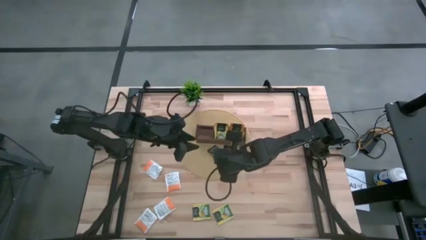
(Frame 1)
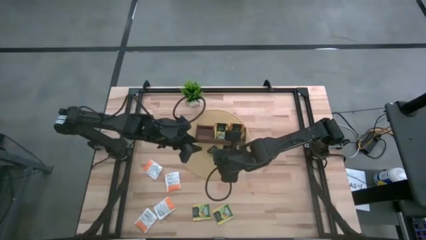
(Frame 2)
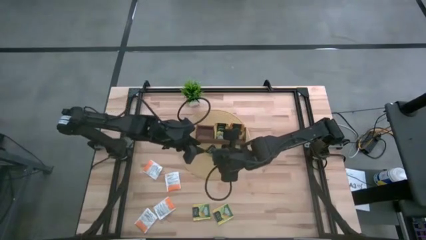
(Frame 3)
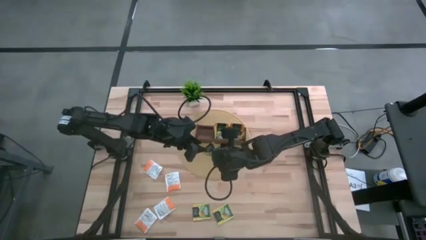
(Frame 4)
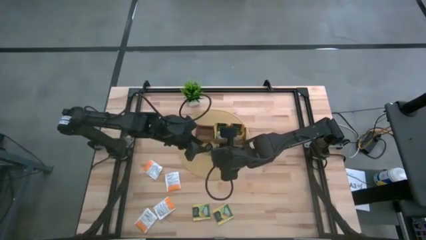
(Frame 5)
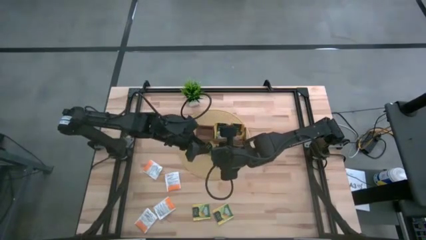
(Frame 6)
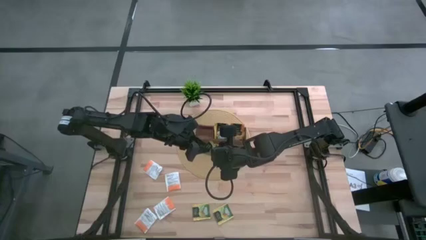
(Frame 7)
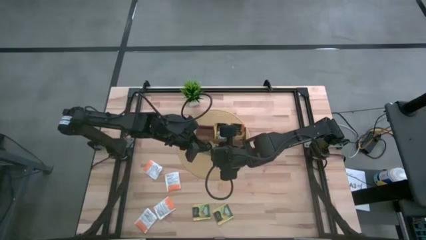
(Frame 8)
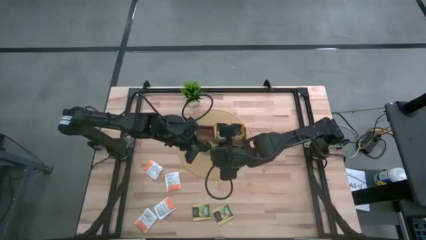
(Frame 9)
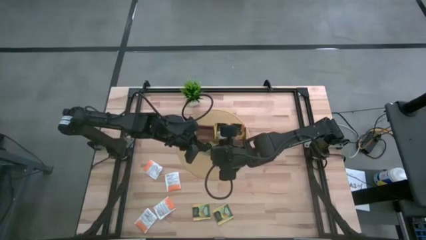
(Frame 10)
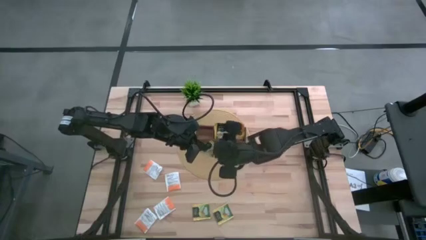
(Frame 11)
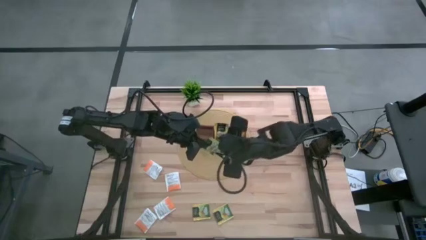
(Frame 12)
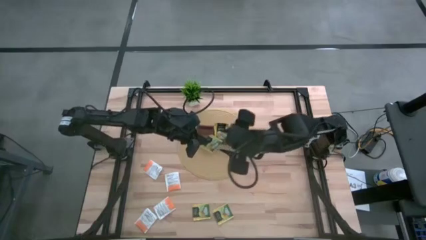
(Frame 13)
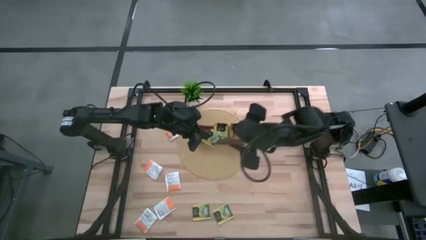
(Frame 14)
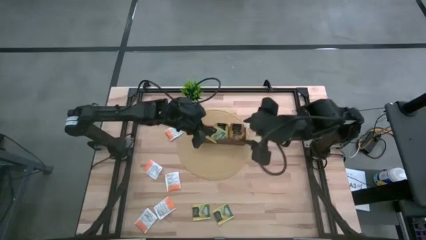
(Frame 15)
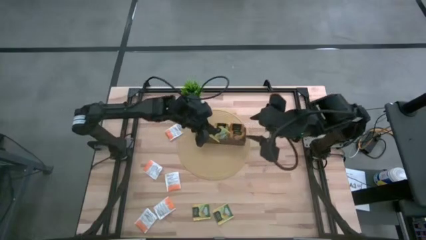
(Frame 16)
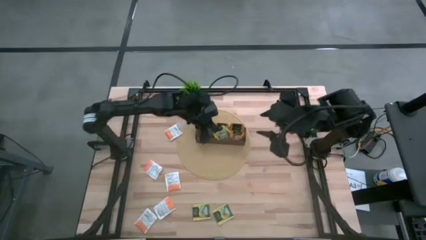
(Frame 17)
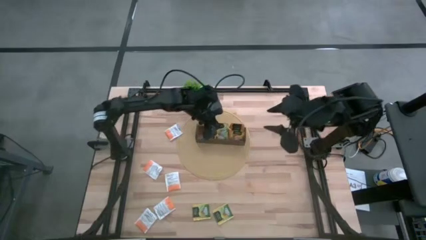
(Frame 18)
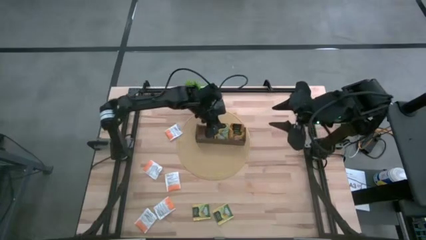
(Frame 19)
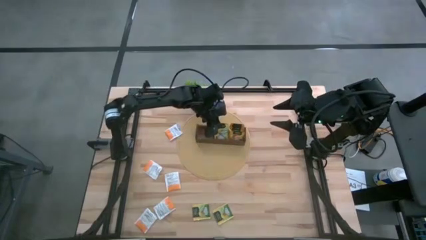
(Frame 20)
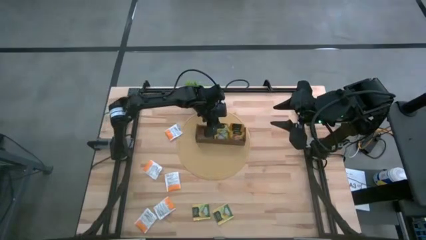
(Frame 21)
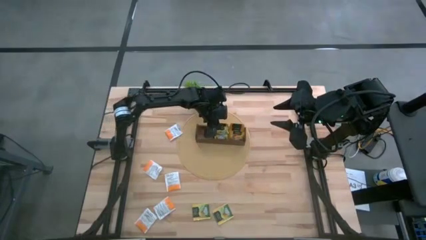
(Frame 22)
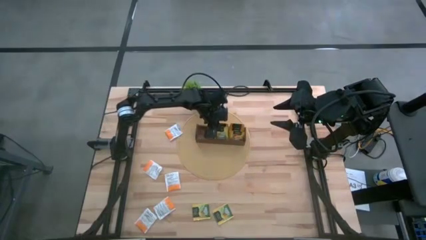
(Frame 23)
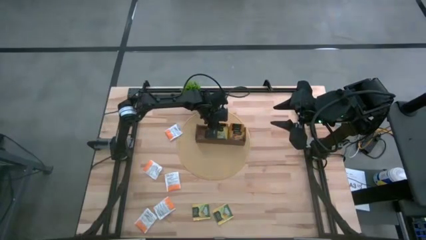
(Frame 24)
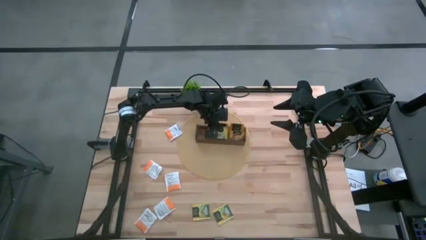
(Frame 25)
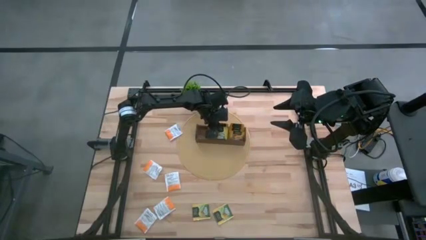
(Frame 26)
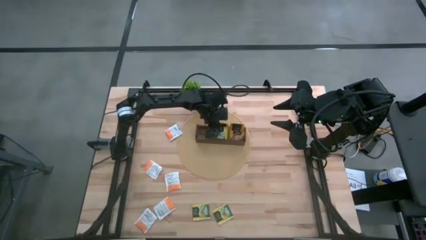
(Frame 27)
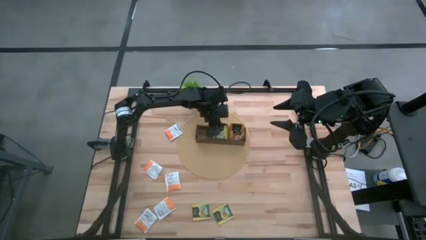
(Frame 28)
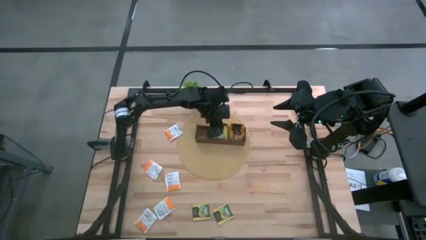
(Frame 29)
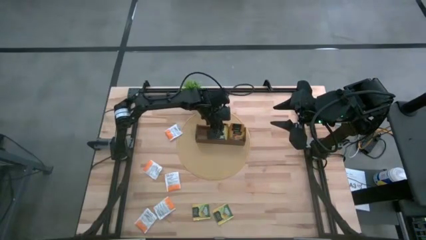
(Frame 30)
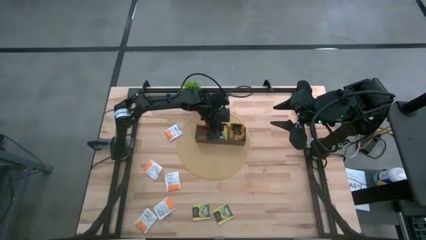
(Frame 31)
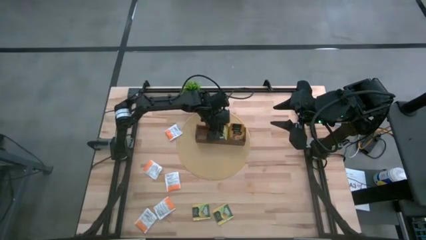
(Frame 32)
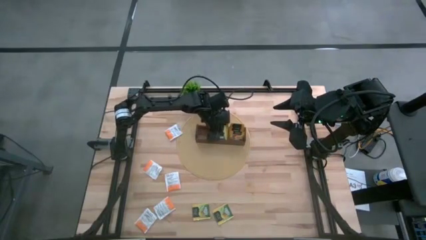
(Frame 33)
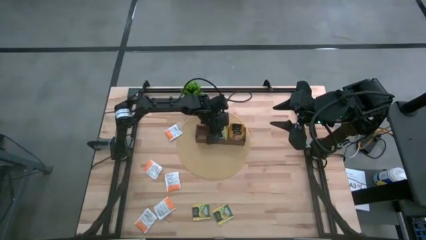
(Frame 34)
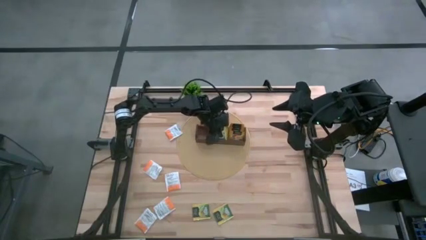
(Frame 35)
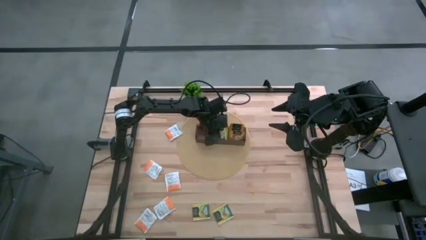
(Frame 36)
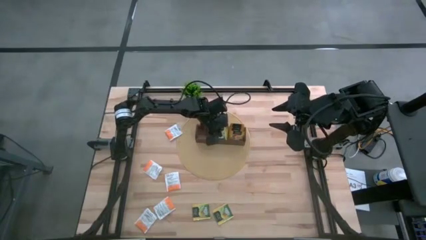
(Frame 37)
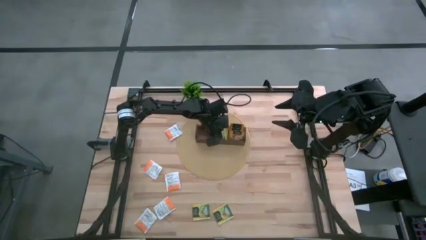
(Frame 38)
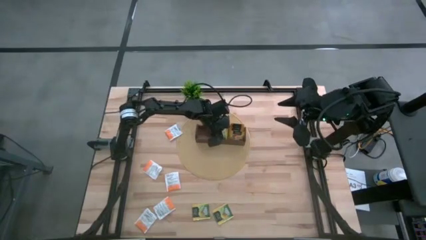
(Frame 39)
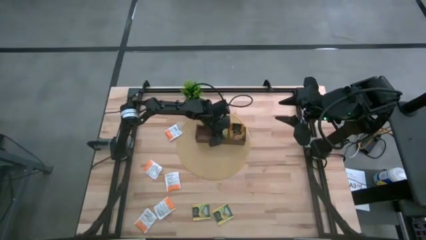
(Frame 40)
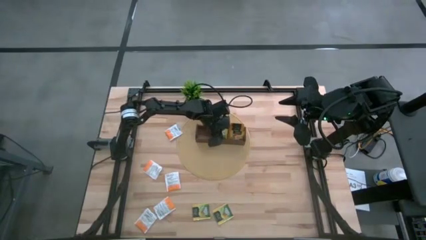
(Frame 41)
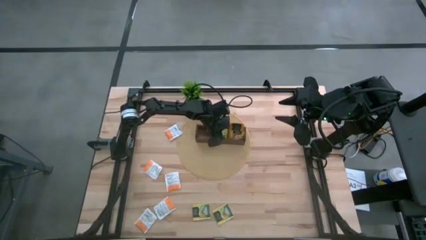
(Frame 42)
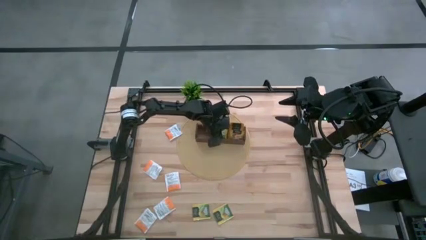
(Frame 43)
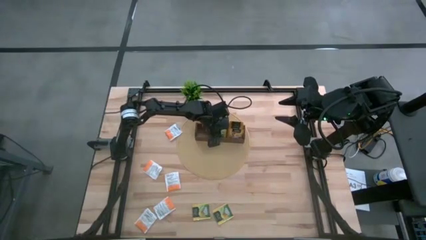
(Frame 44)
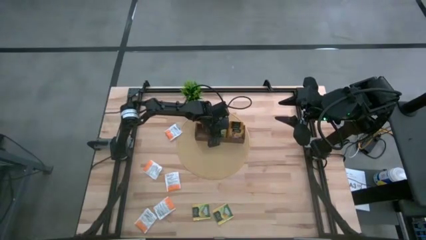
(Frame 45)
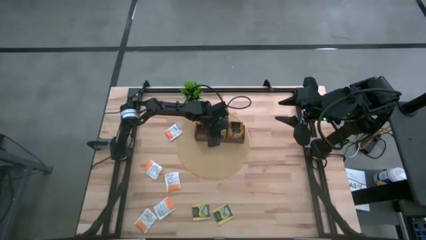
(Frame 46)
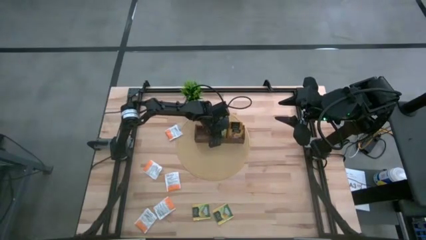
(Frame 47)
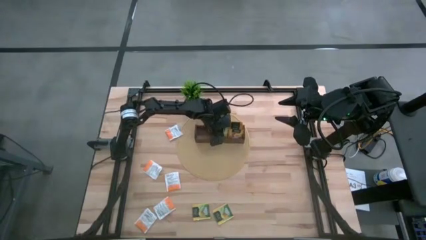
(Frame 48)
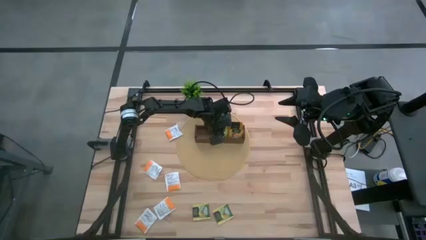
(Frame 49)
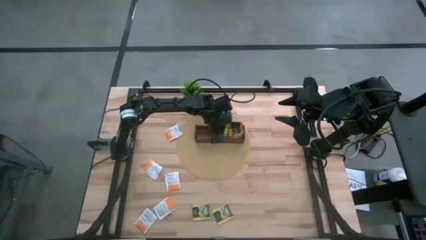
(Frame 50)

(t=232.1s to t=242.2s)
Task: Pick & Place Tea
Put the yellow tea bag into the middle section of the wooden organizer

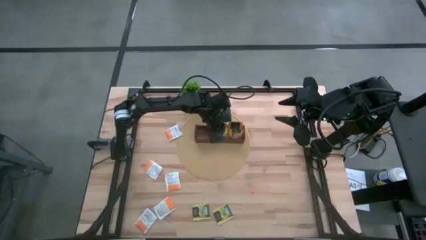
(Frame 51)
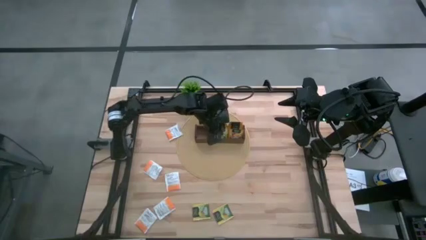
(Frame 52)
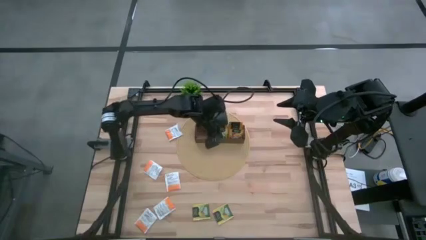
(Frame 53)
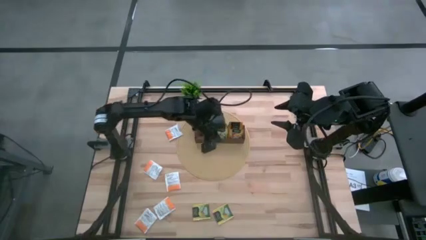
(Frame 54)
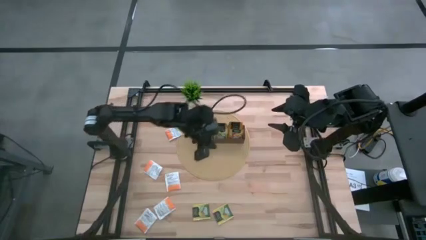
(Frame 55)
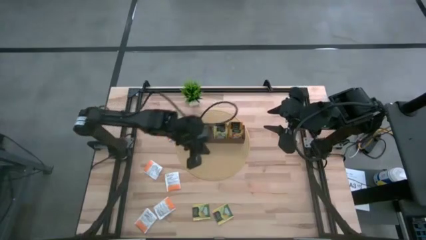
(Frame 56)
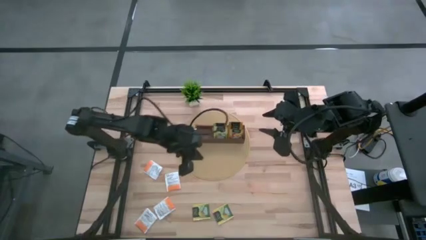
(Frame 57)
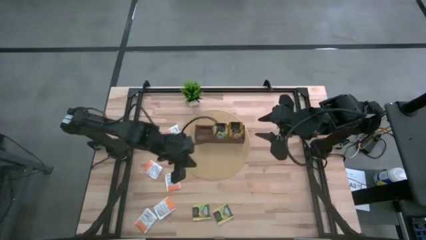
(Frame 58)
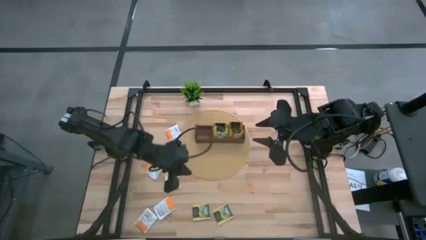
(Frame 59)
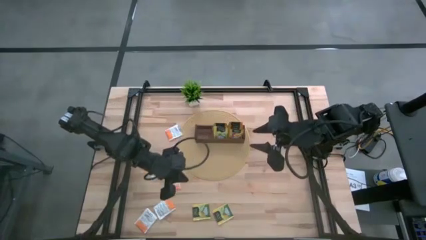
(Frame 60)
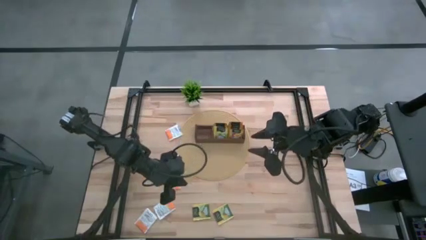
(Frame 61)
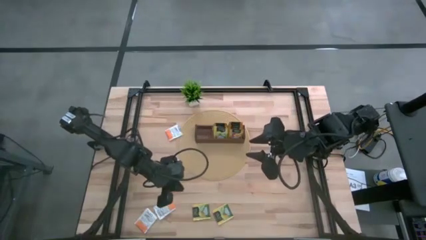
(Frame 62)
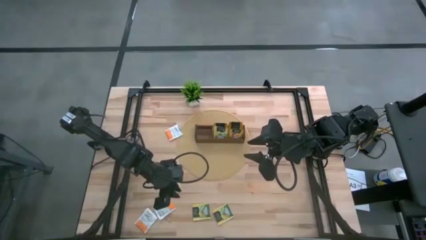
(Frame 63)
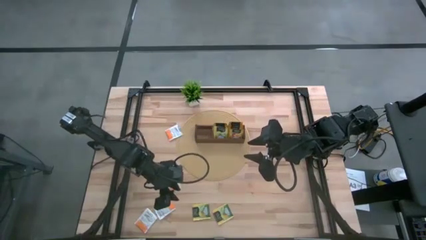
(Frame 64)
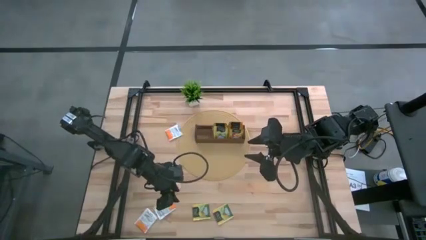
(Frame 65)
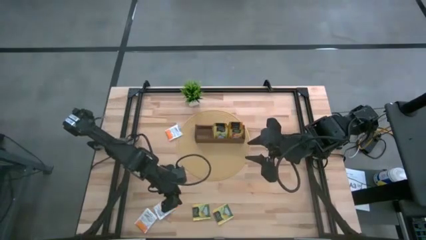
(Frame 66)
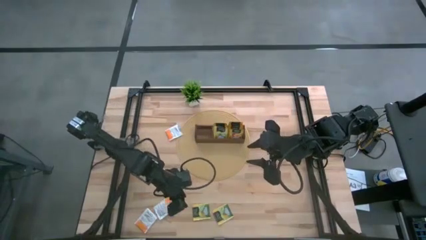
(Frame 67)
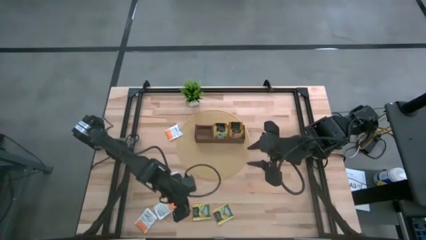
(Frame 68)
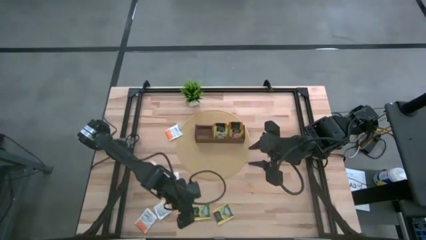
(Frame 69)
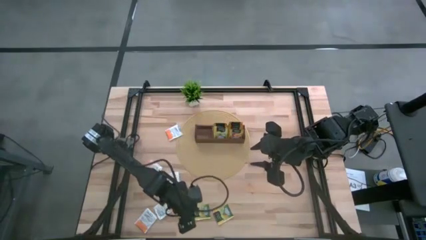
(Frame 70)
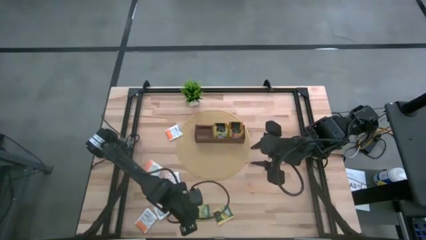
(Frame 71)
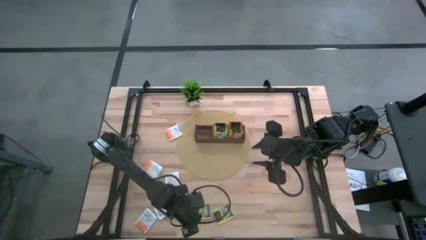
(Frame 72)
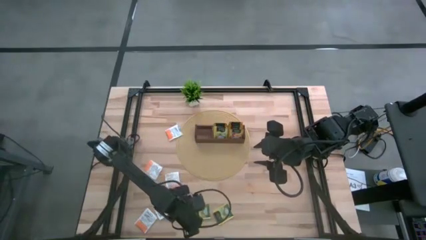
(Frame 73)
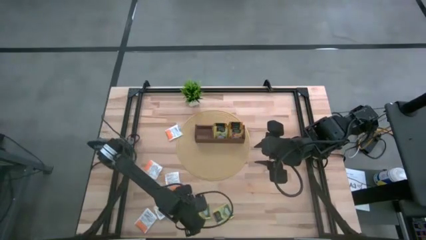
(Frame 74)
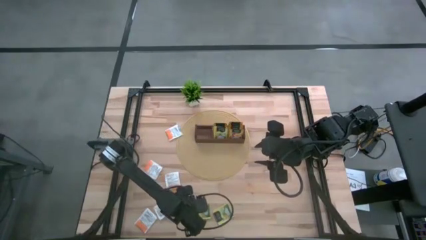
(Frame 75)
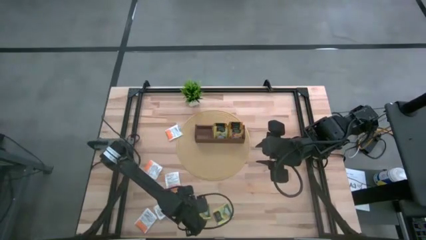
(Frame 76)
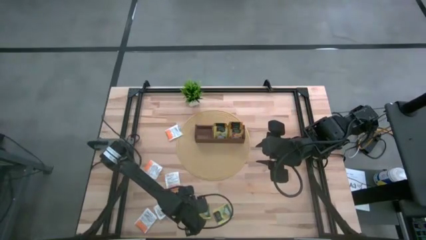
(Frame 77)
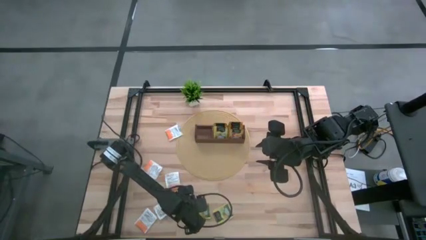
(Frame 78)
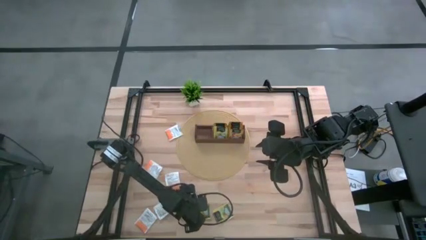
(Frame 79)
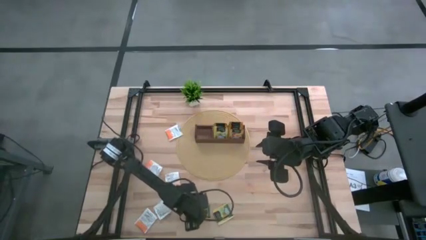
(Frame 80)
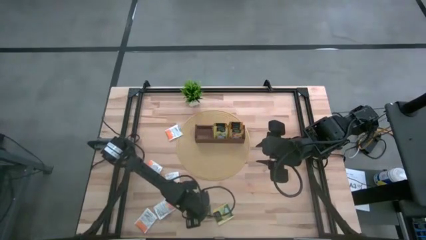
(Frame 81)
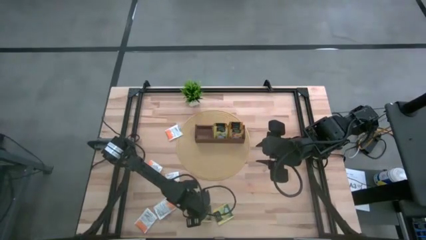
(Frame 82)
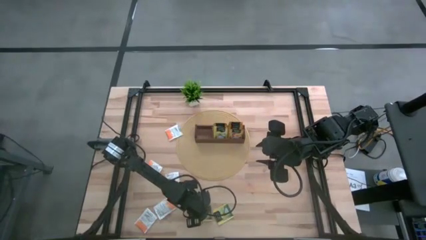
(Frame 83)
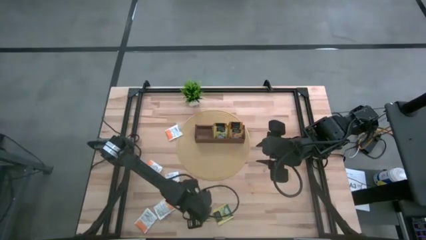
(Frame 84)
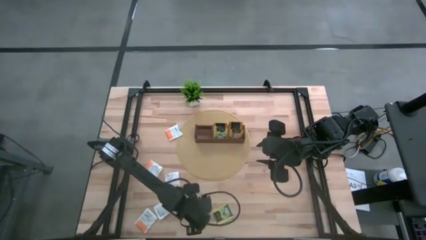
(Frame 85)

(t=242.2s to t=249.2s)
Put the yellow tea bag into the middle section of the wooden organizer
